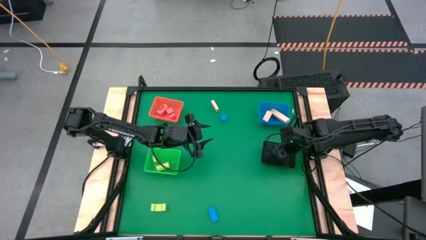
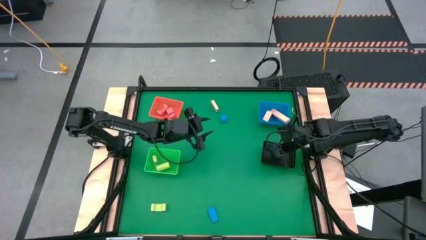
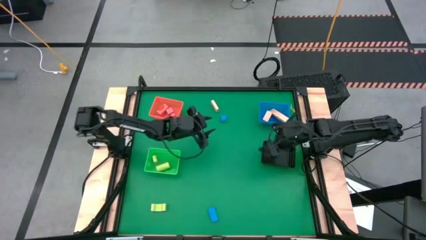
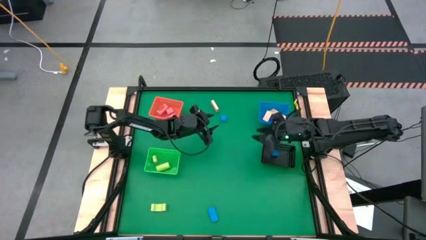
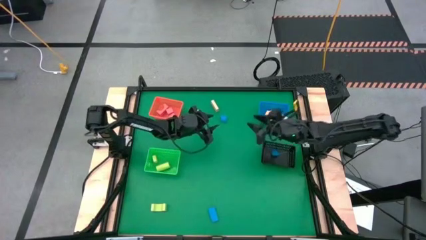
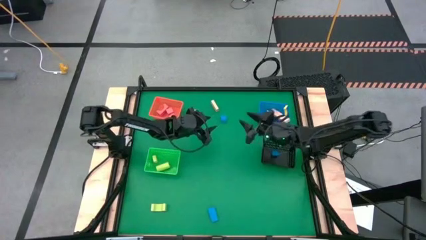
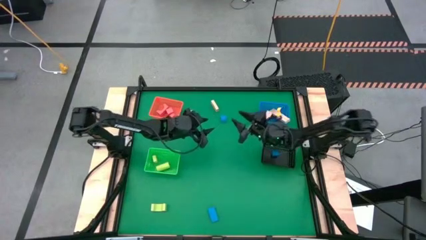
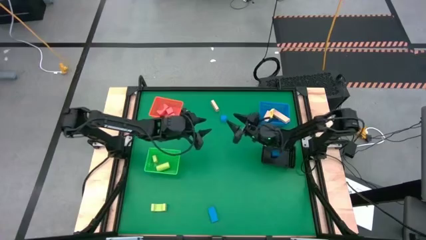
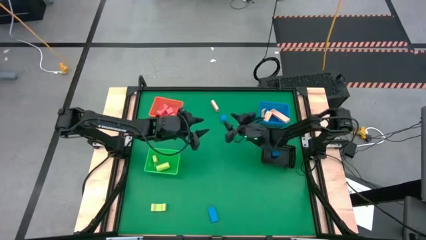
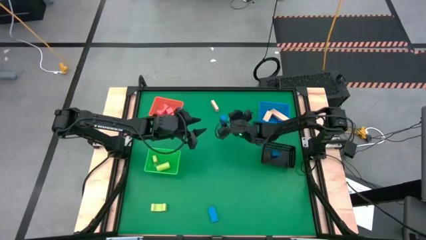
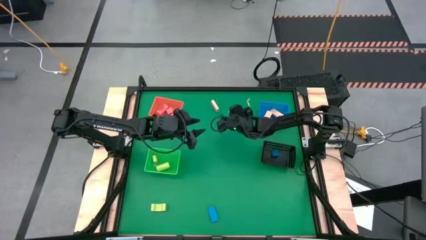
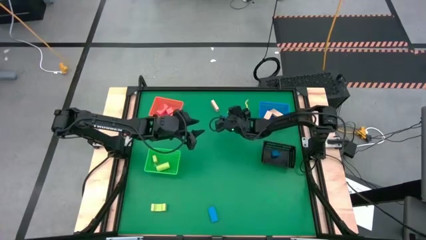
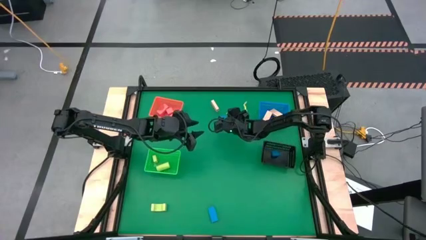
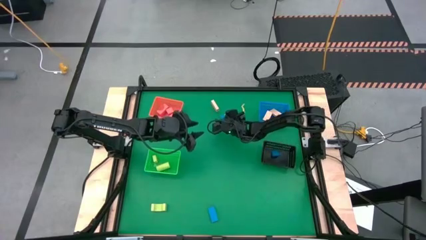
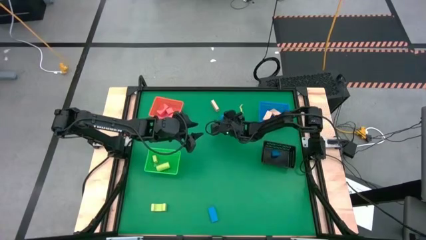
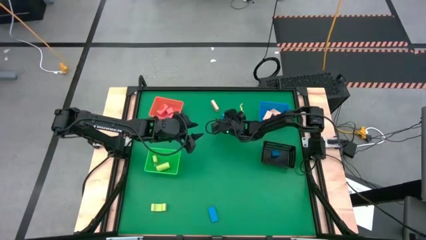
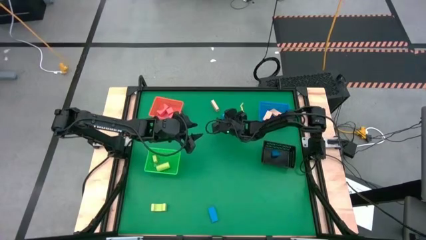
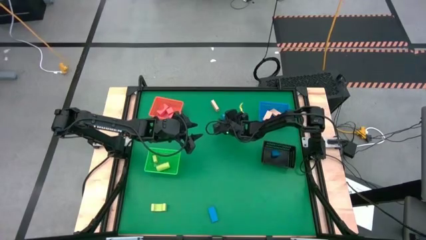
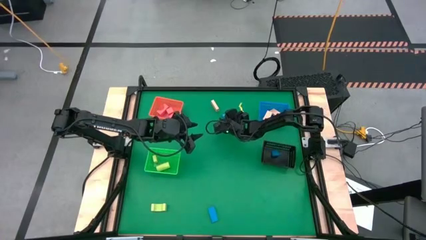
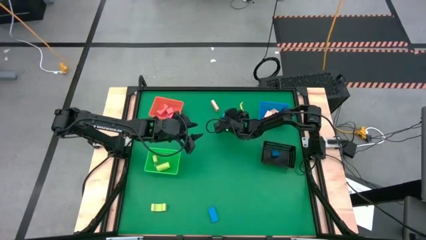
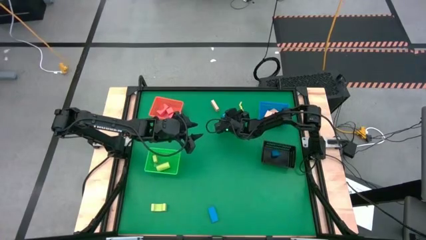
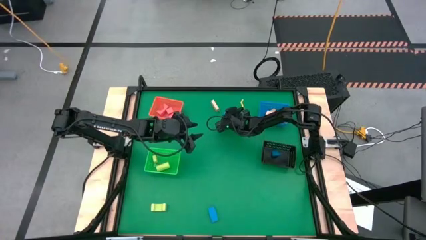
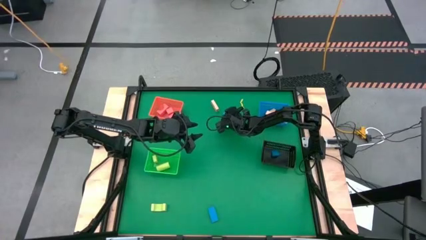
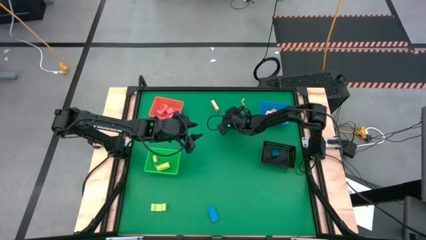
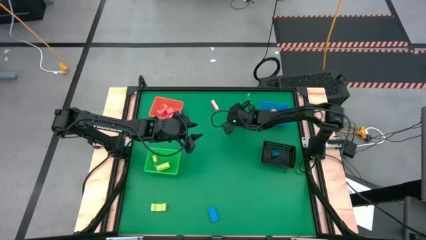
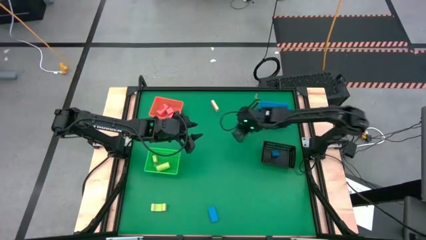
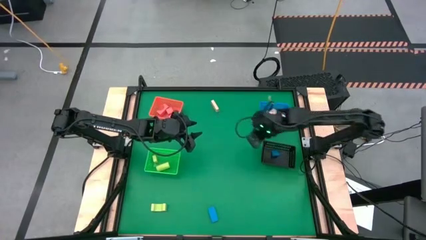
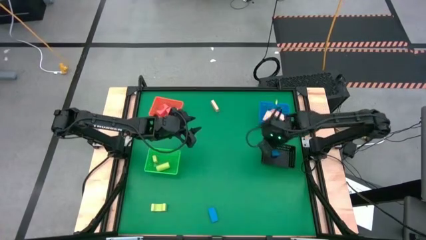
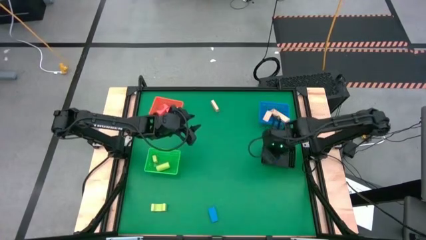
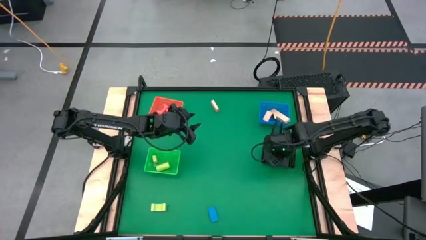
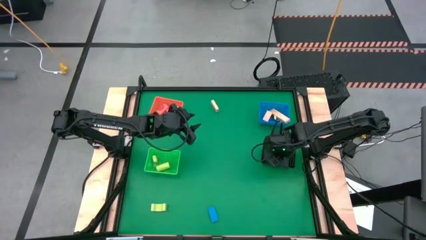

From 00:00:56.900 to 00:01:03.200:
Task: Sort & place blocks by color
Put the top blue block into the black basket

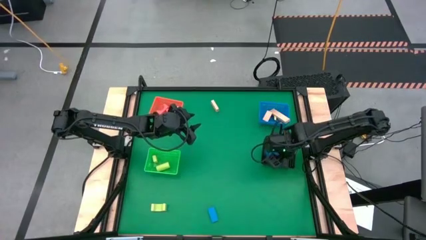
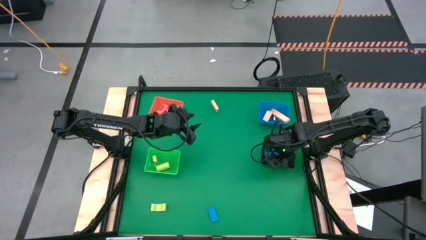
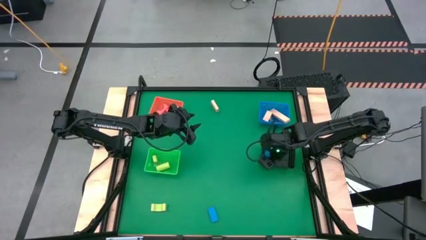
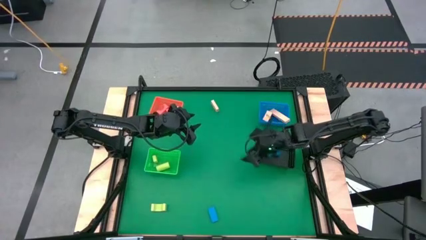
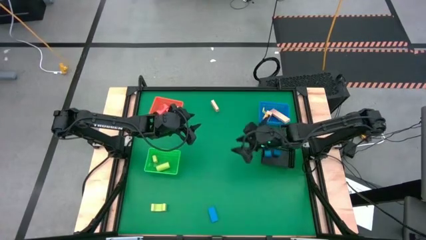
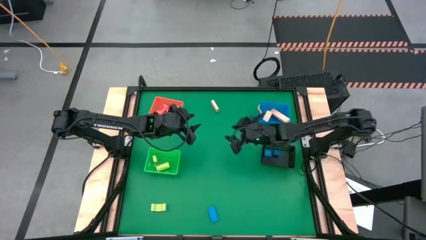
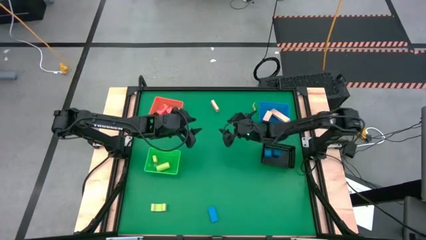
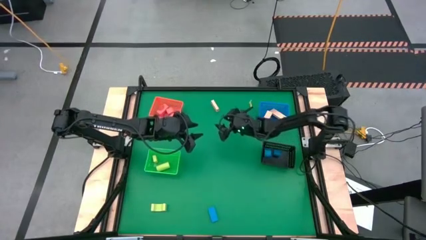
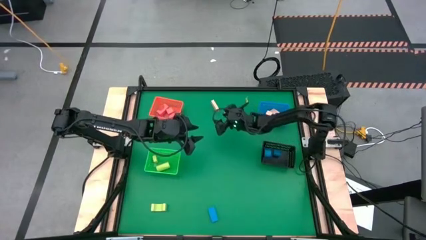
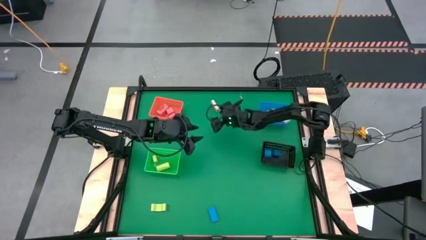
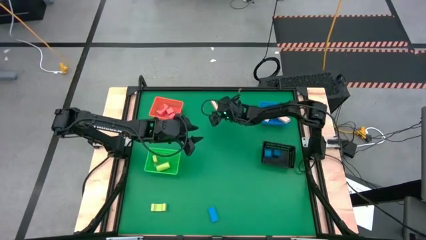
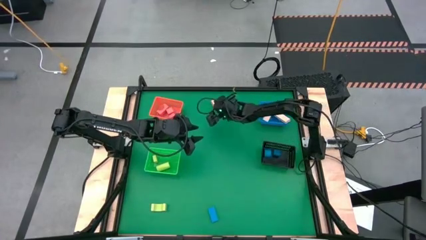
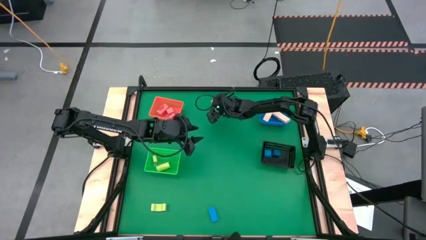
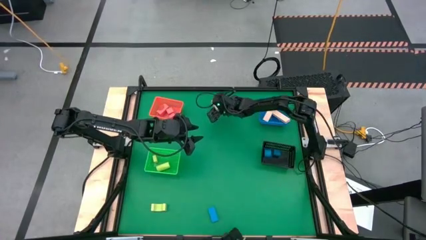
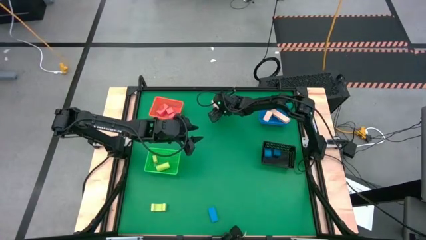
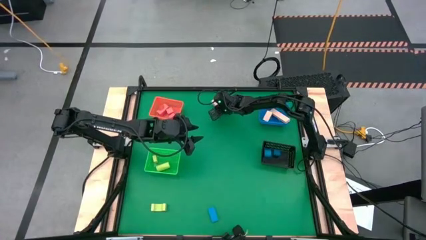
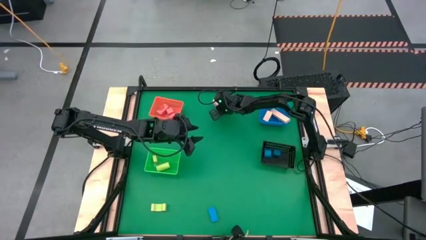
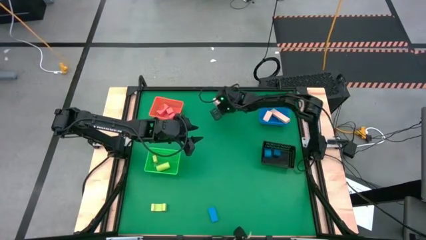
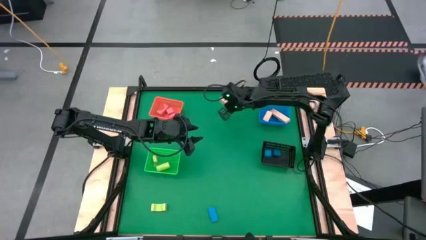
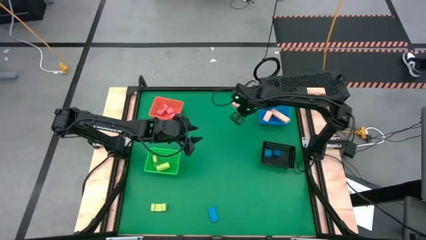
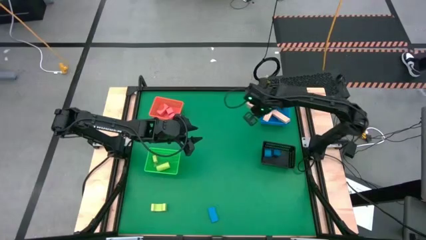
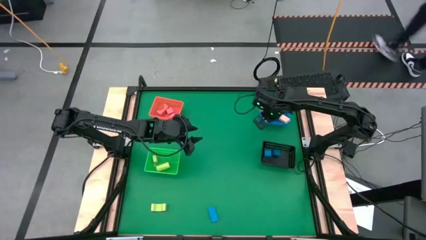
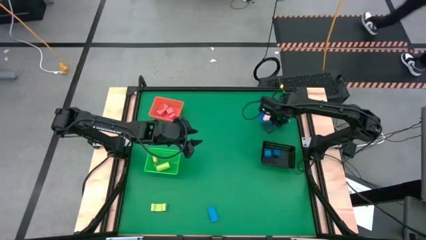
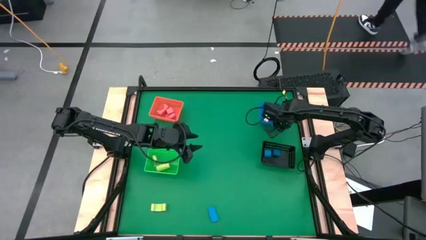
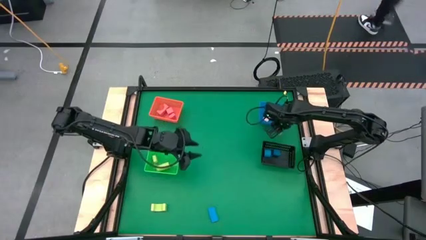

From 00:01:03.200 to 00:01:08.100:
Put the light brown block into the blue basket

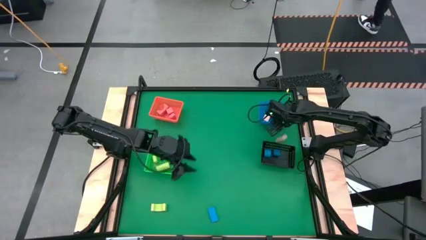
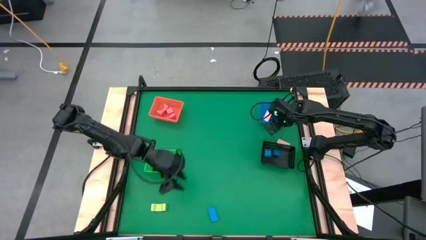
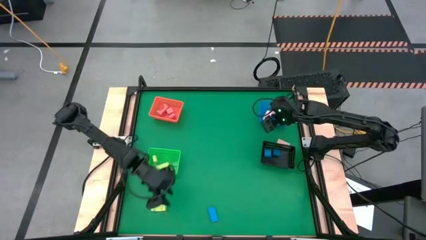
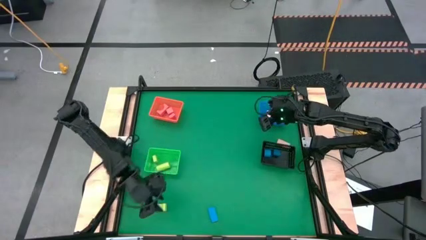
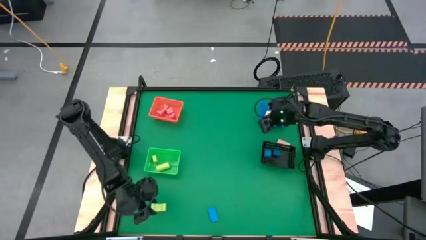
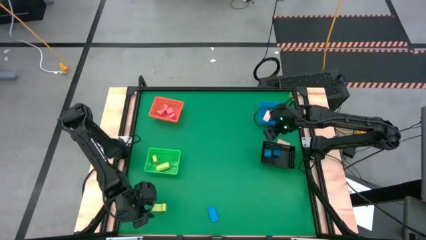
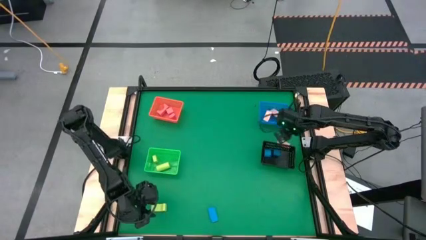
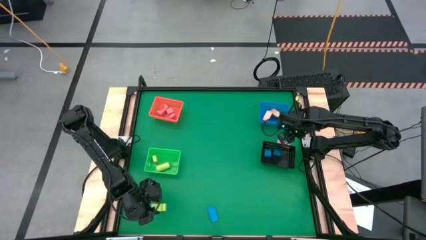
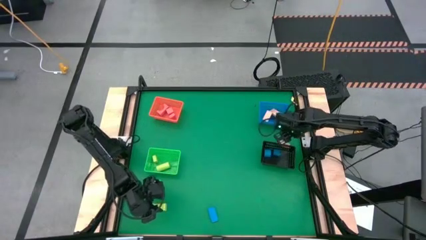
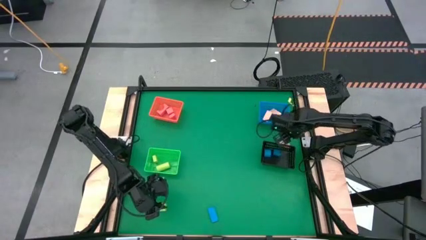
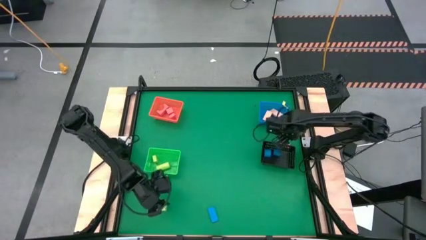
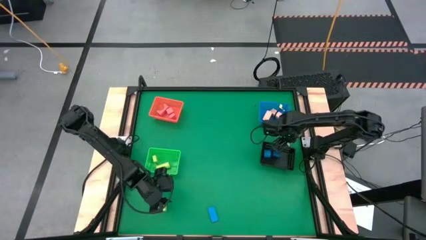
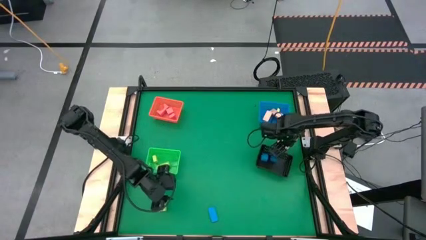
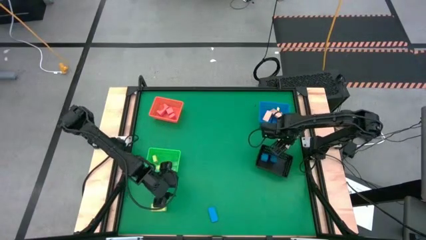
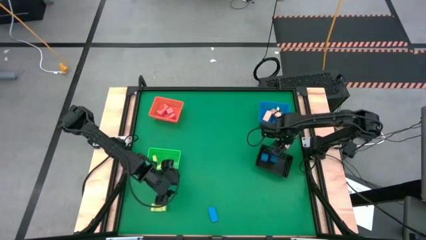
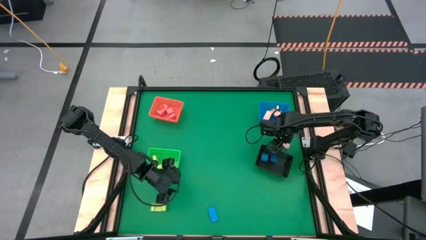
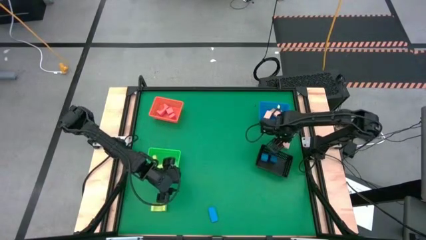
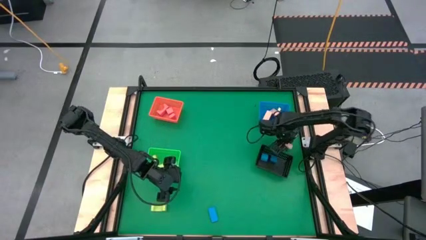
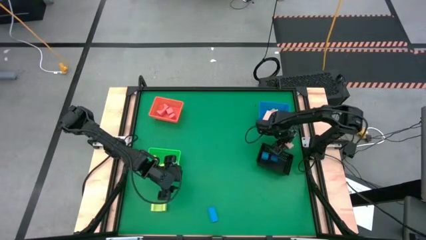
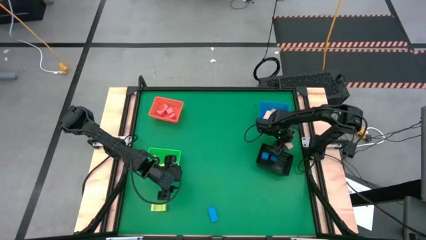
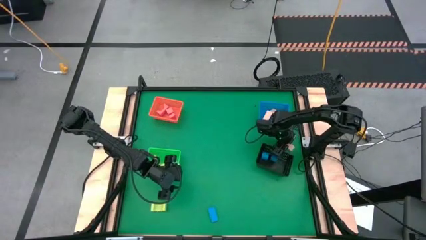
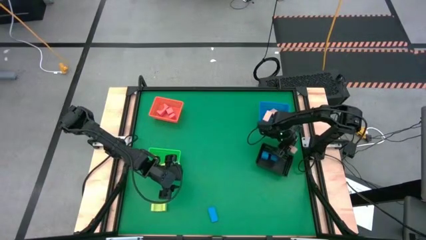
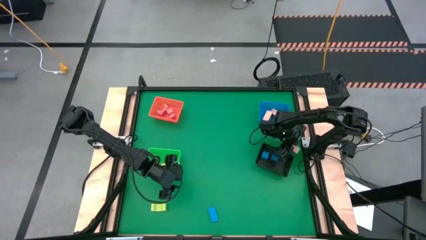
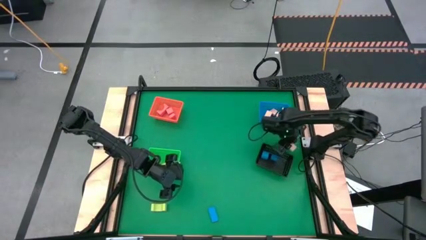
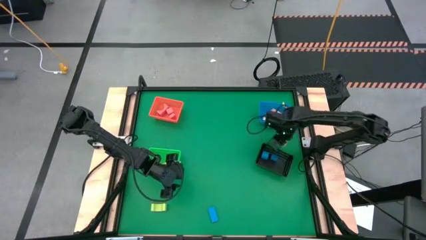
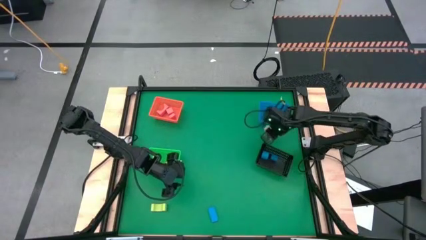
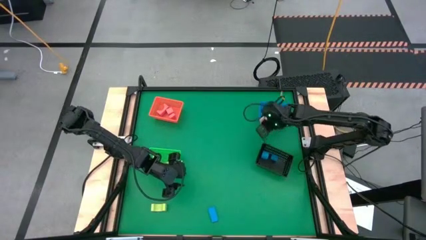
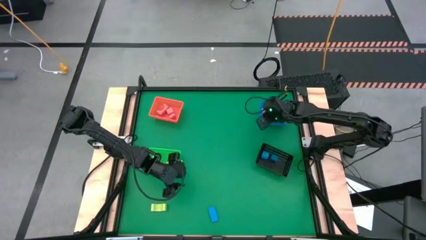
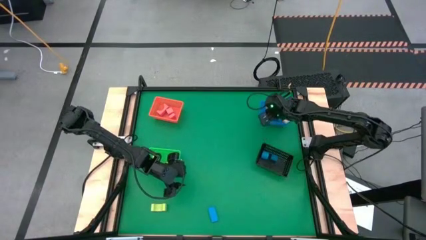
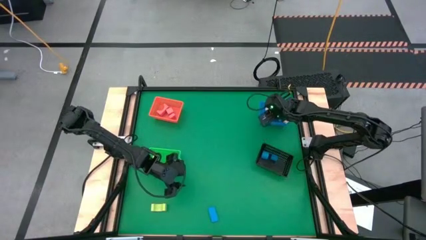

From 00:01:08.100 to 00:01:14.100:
Put the light brown block into the blue basket
